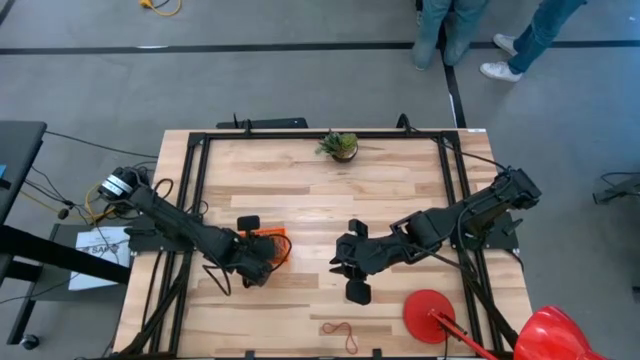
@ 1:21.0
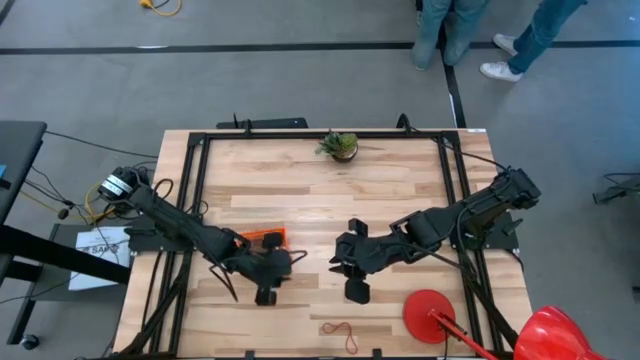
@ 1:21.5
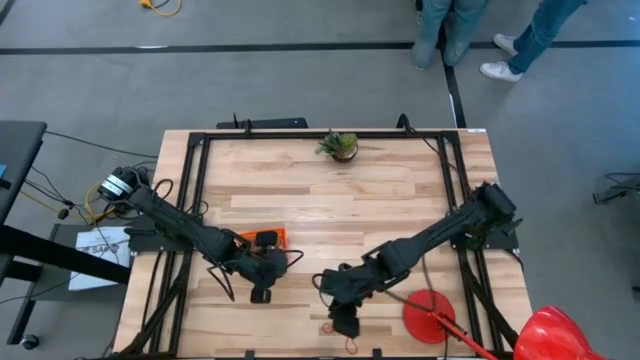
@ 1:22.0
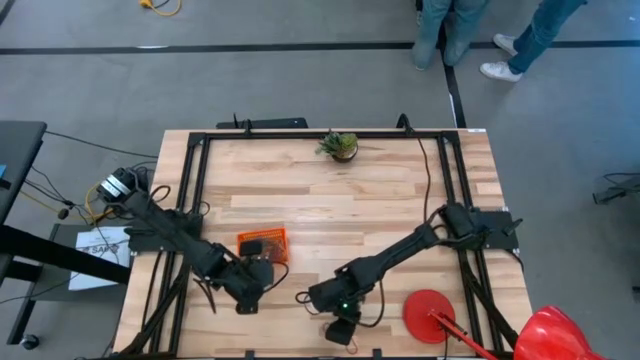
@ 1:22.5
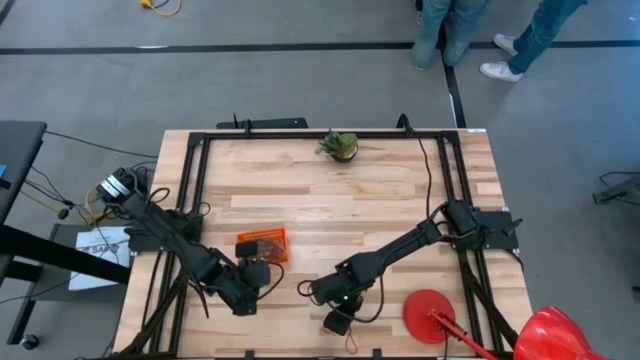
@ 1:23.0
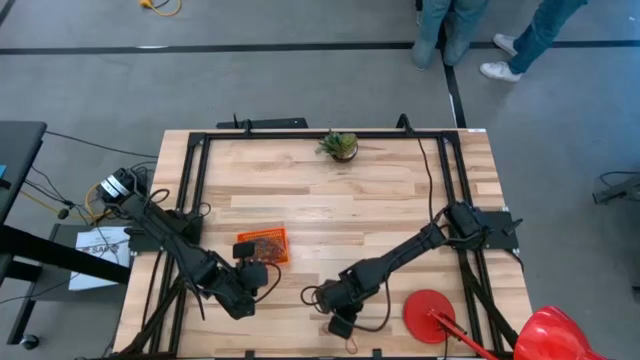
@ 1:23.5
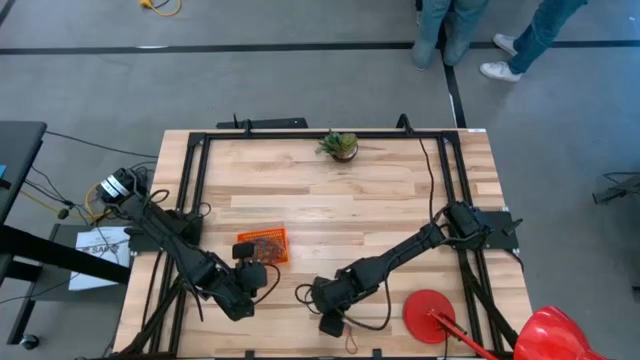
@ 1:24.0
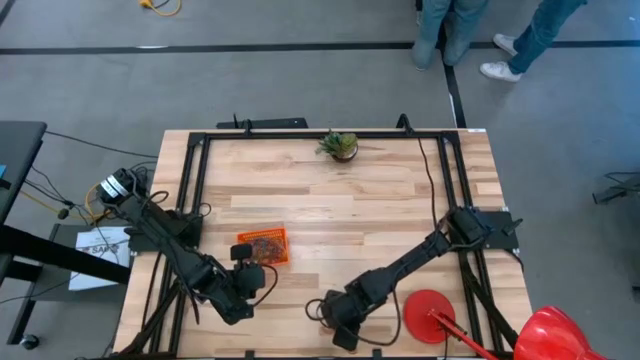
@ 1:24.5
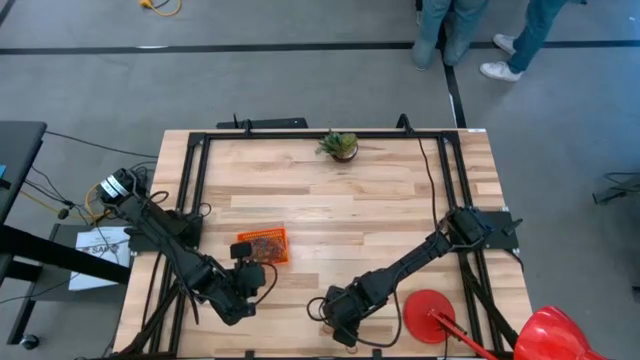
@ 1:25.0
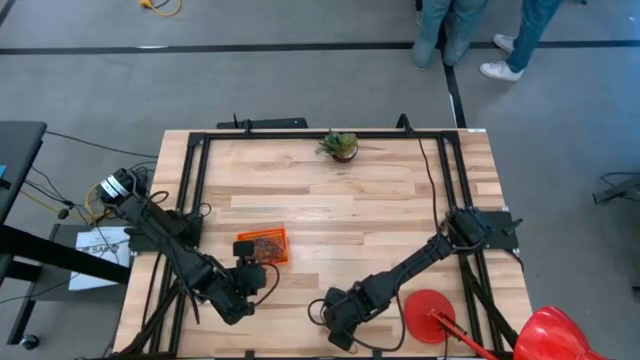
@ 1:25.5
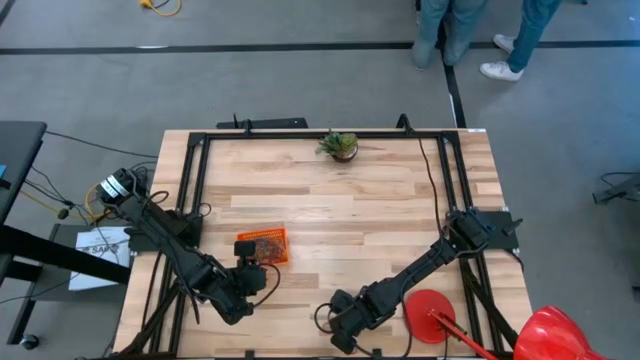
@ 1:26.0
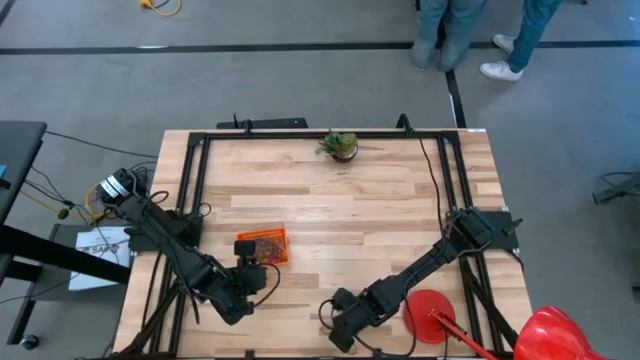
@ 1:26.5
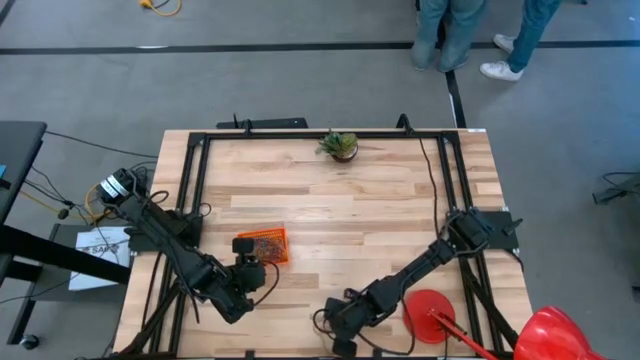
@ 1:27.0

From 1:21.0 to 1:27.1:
Task: Pick and place rubber bands into bin
Put the red rubber band into the orange container

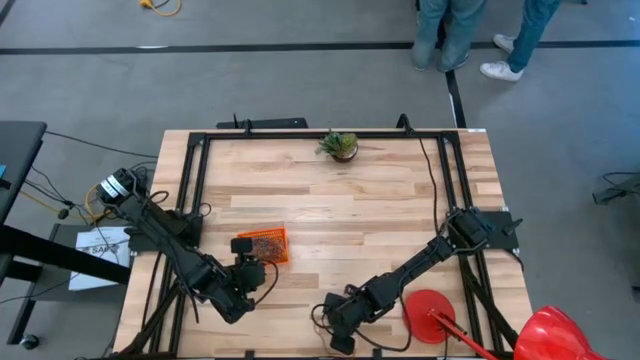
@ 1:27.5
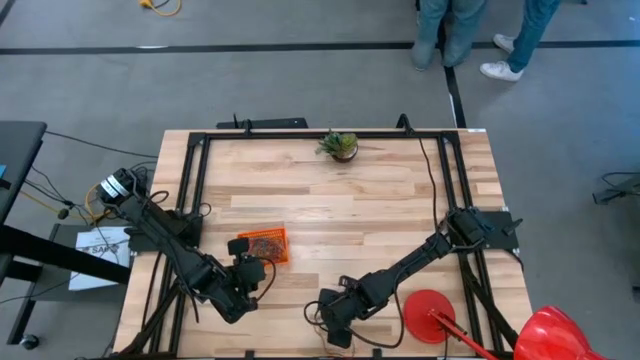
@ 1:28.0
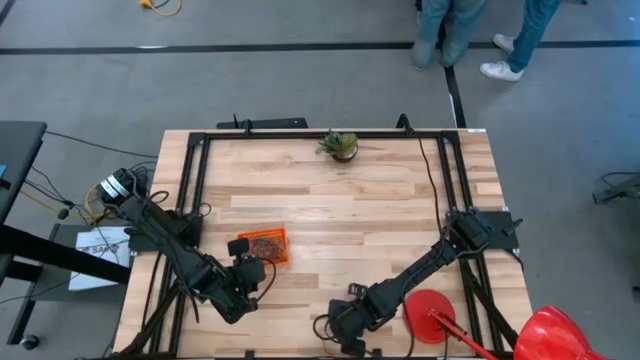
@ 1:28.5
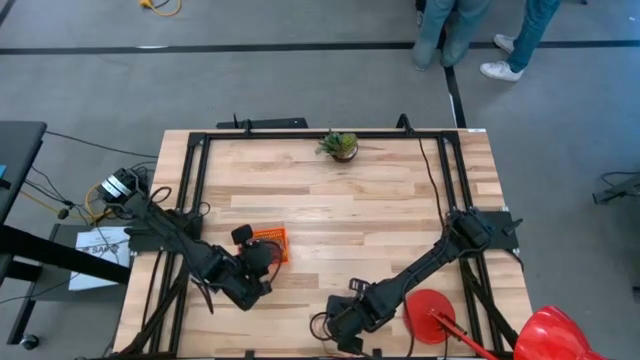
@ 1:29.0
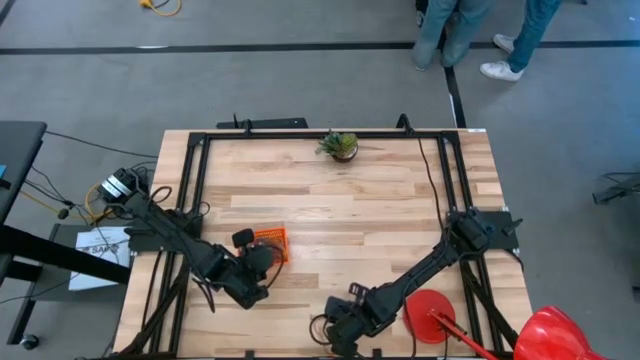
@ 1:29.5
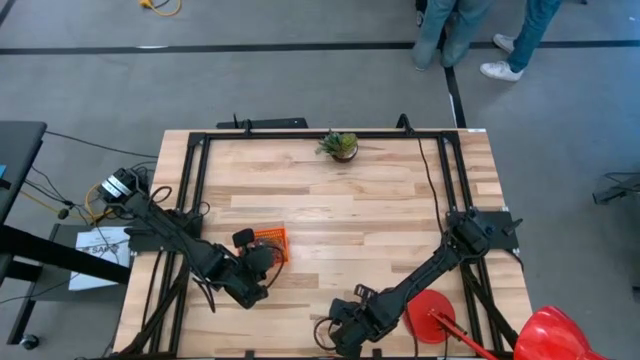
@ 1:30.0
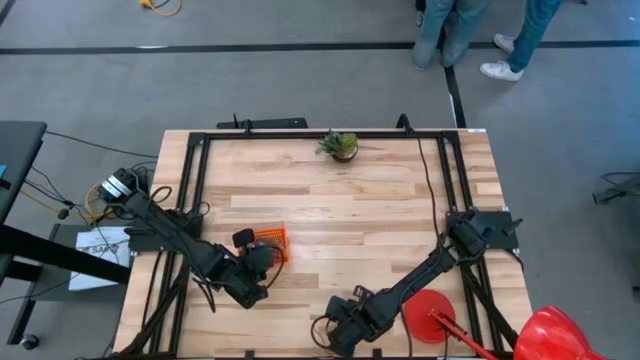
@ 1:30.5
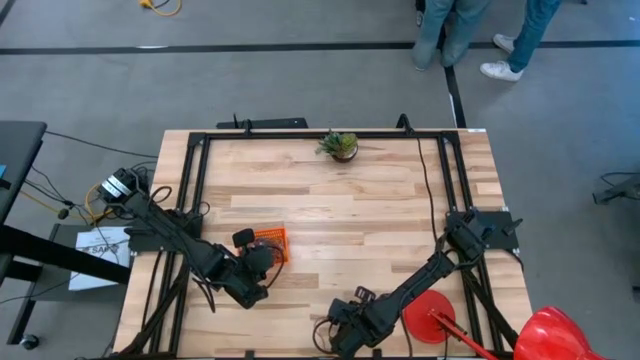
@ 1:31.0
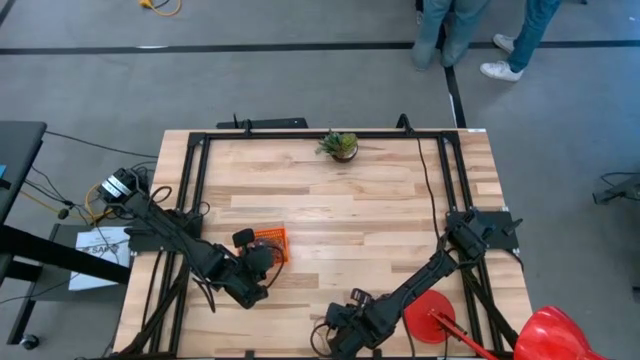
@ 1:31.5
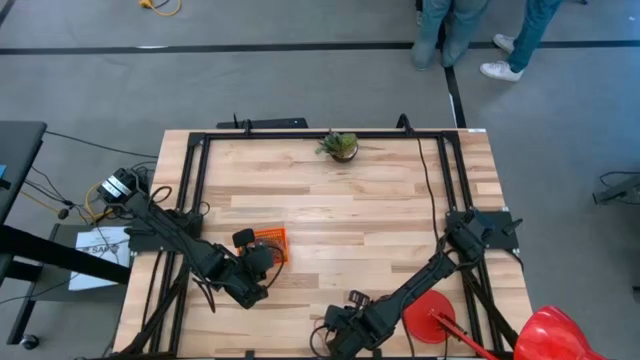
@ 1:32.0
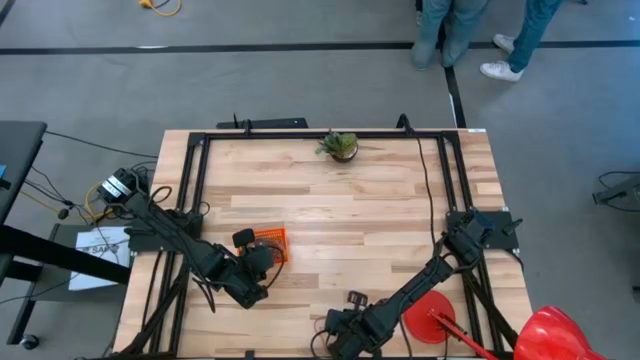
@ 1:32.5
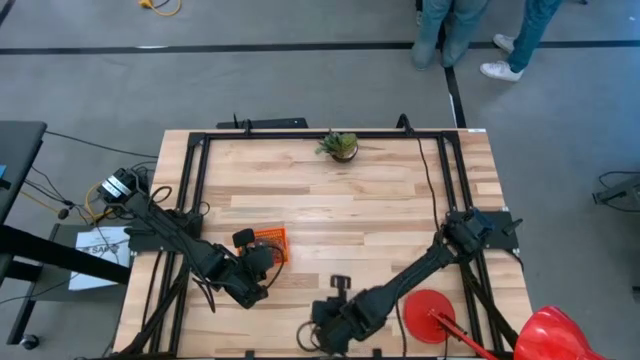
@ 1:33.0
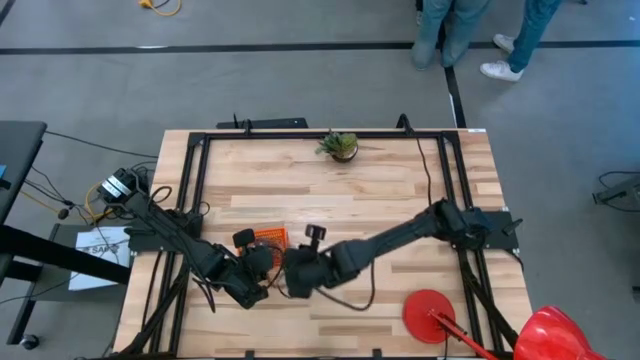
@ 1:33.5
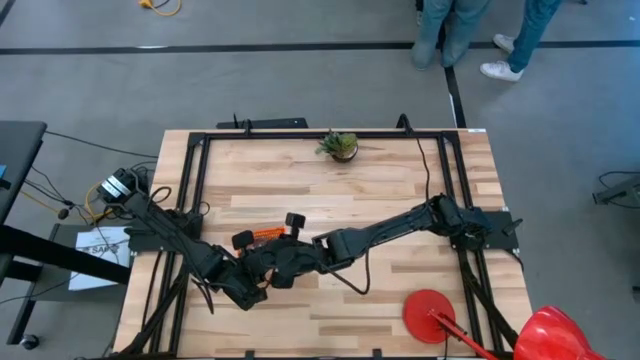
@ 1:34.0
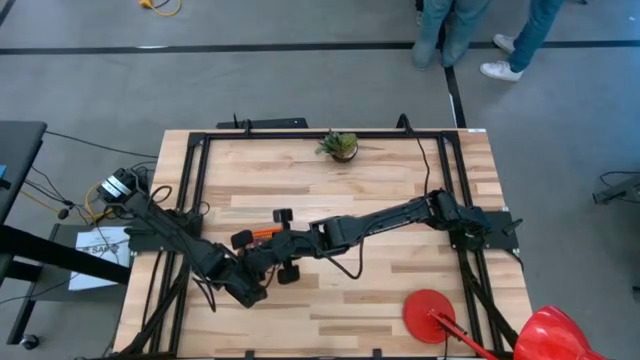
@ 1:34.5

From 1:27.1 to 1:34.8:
Put the red rubber band into the orange container

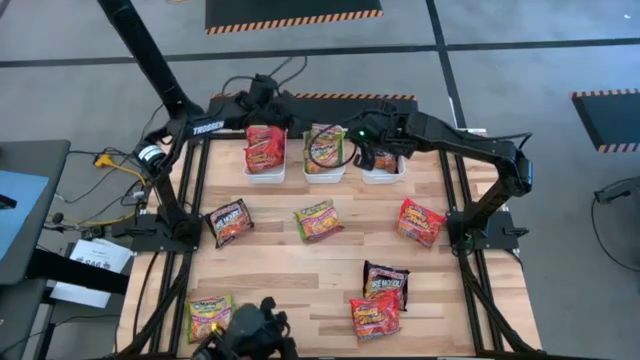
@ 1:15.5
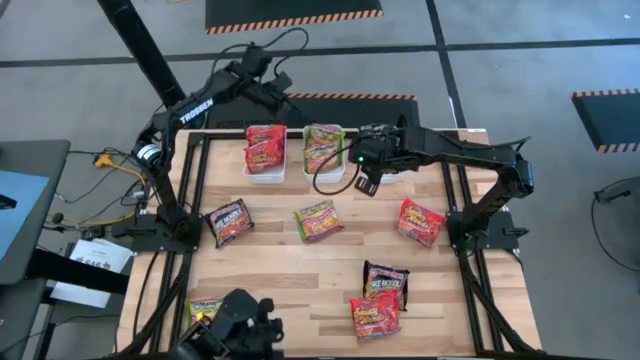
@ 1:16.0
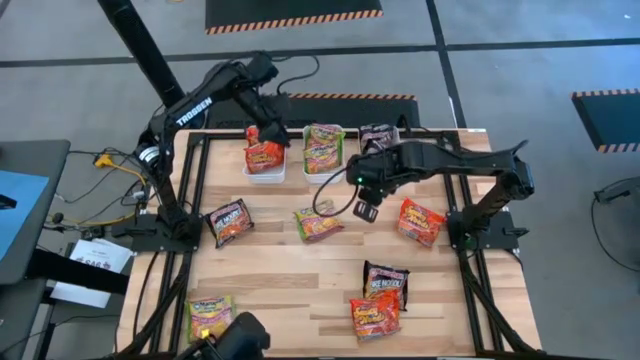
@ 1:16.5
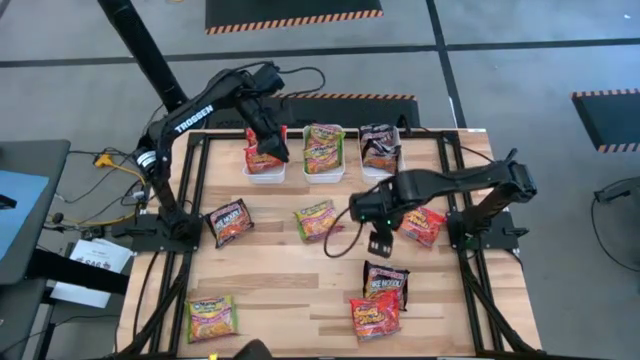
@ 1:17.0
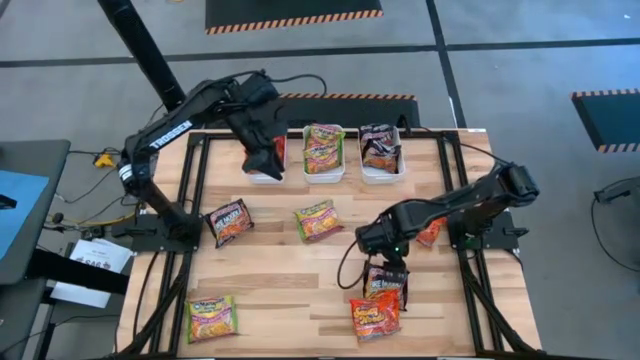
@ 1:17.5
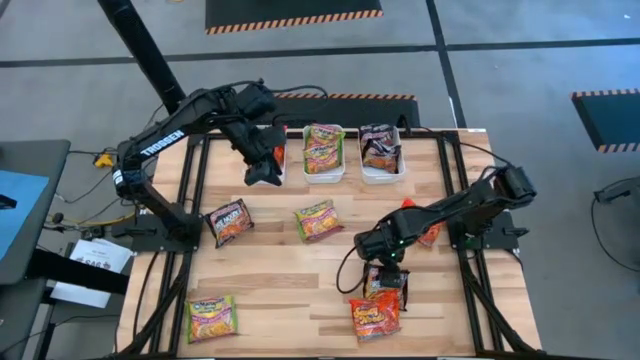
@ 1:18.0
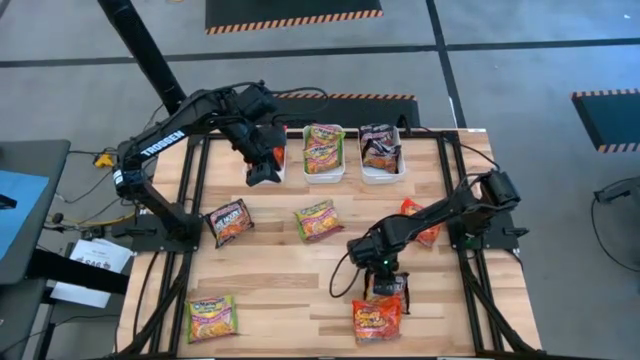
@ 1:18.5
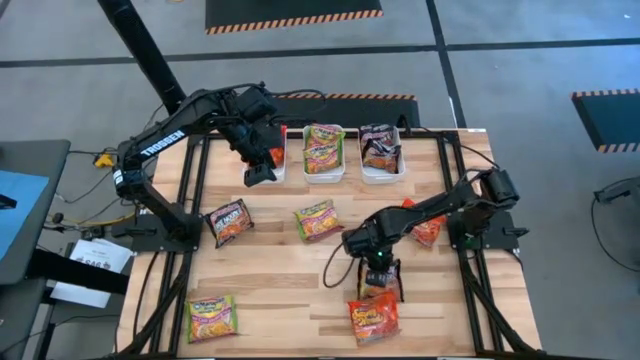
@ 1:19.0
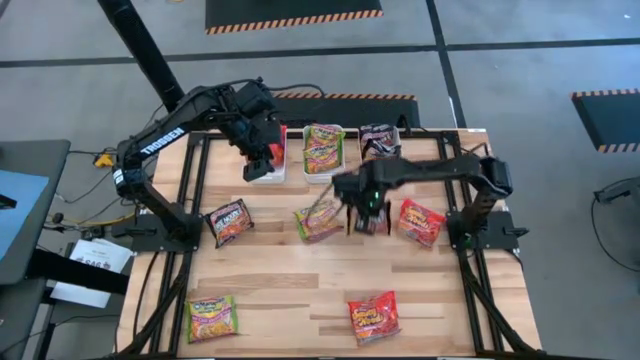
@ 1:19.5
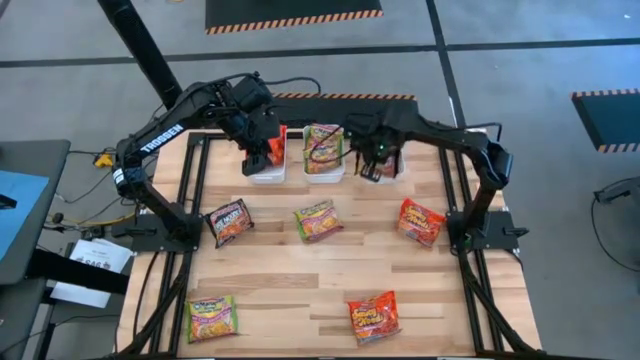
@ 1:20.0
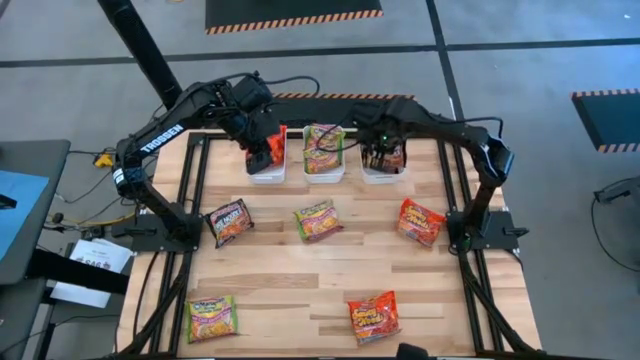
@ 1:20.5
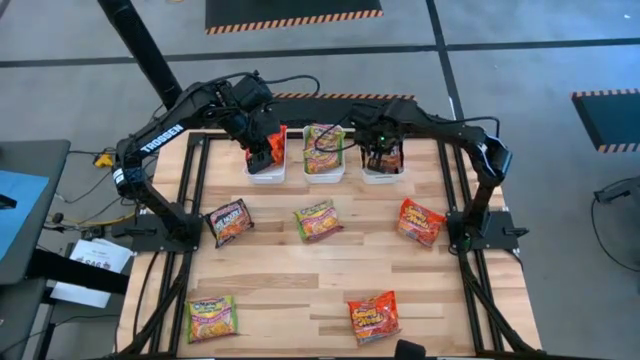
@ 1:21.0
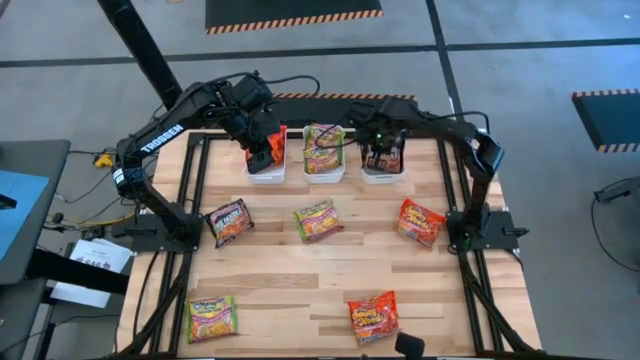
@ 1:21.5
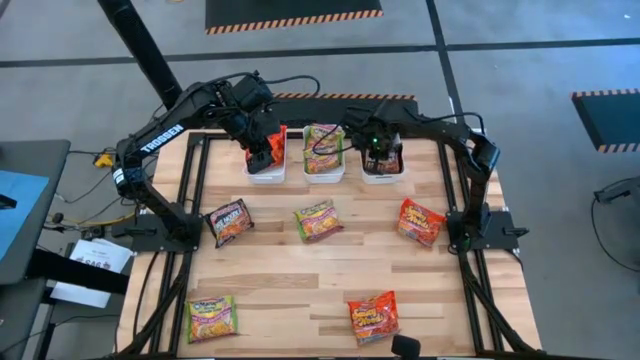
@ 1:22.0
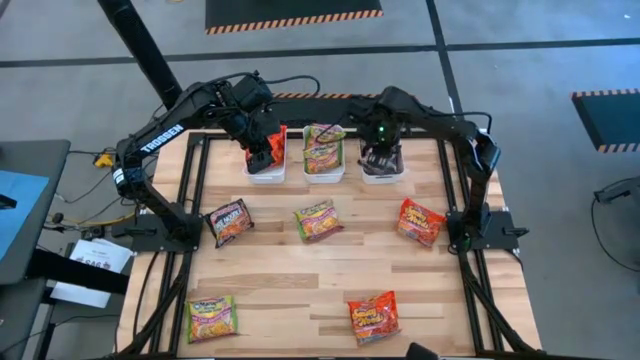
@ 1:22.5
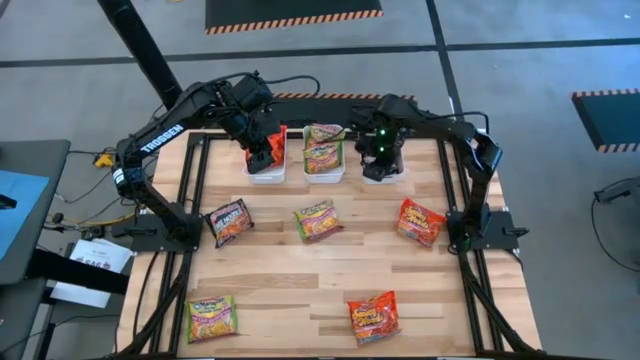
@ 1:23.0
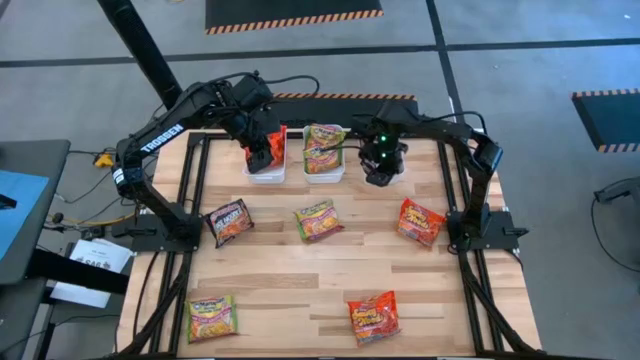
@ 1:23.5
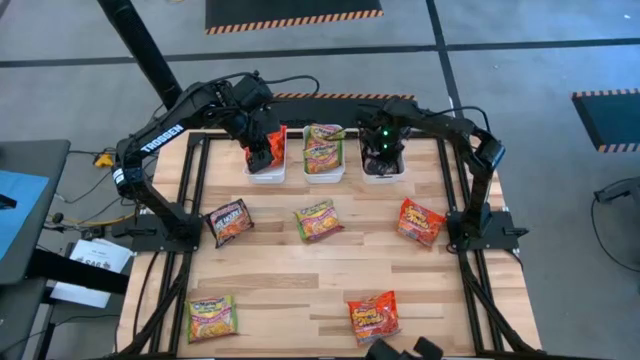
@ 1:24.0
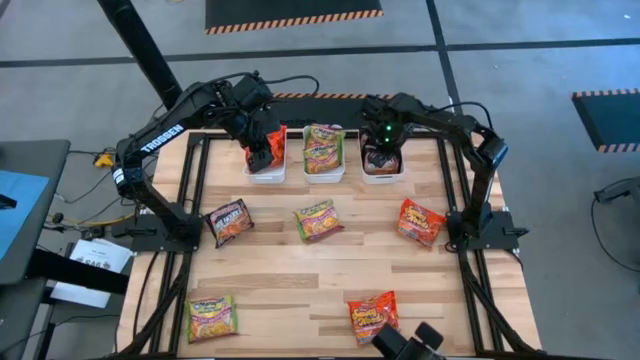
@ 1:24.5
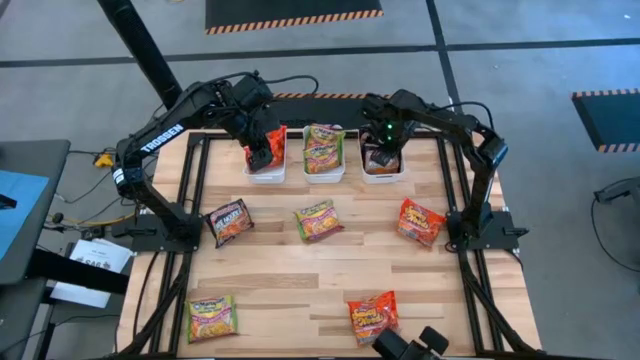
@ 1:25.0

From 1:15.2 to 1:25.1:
Task: Sort Maruchan noodles
Put the right black noodle pack into the right white bin
